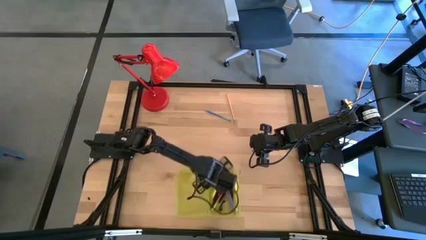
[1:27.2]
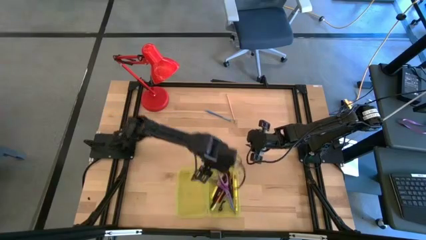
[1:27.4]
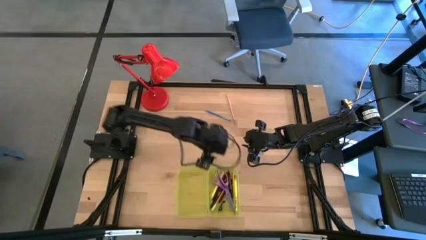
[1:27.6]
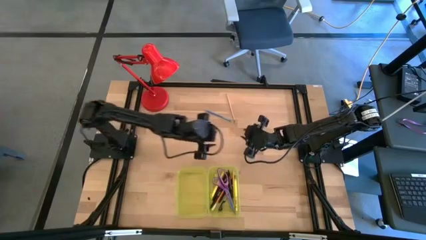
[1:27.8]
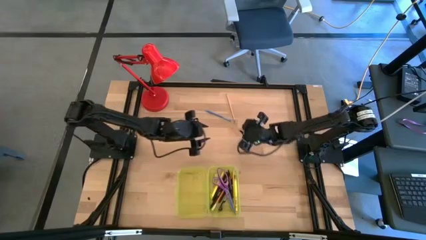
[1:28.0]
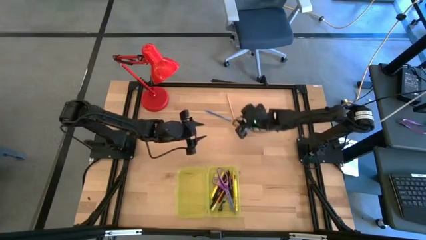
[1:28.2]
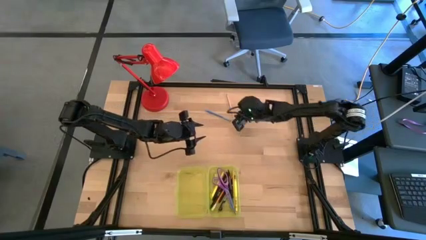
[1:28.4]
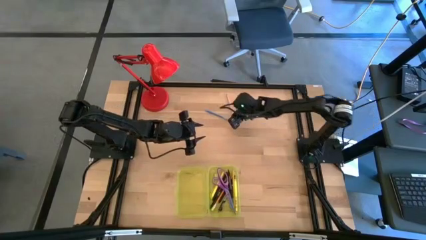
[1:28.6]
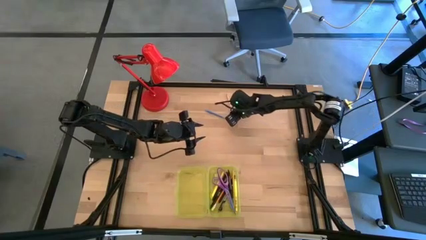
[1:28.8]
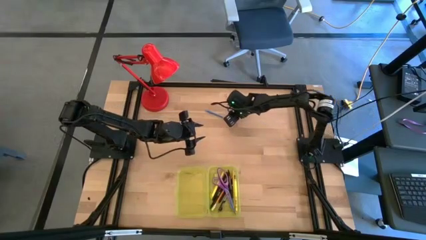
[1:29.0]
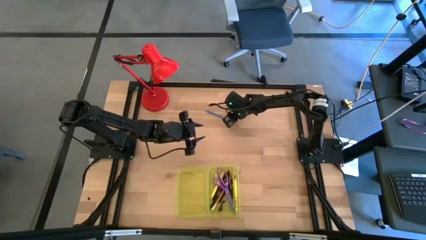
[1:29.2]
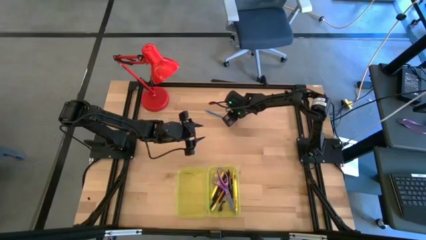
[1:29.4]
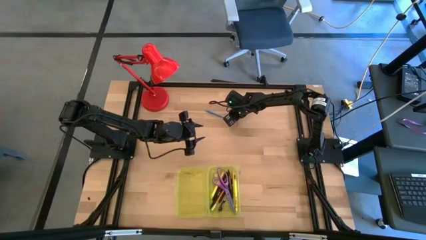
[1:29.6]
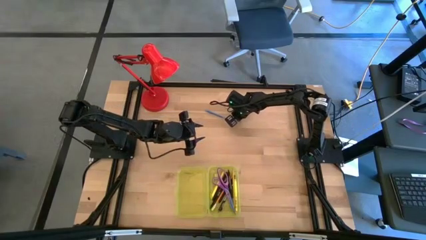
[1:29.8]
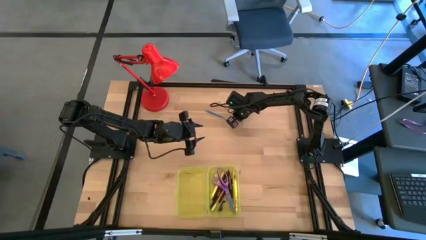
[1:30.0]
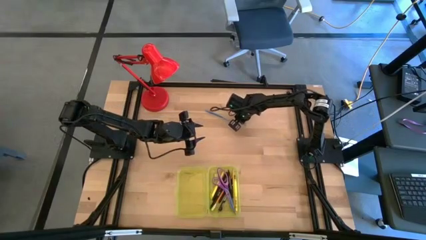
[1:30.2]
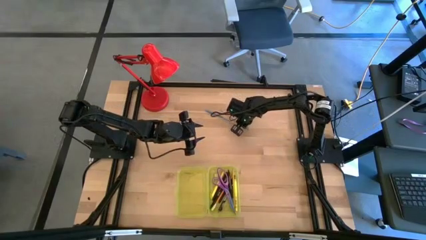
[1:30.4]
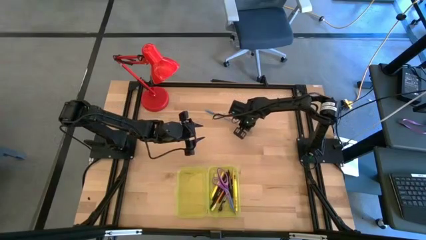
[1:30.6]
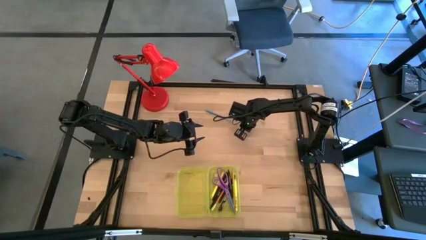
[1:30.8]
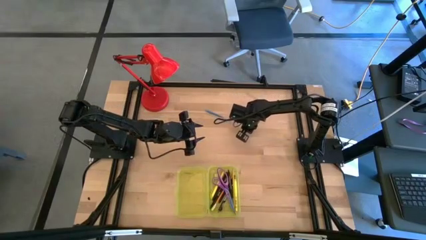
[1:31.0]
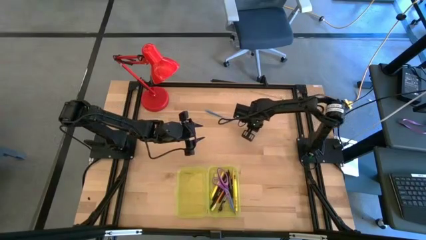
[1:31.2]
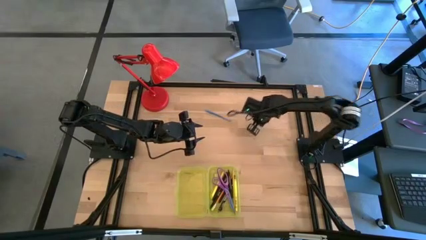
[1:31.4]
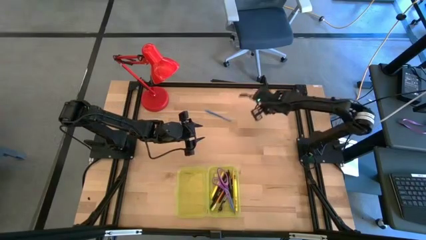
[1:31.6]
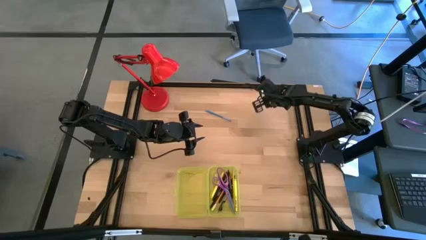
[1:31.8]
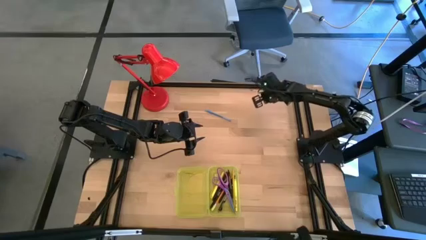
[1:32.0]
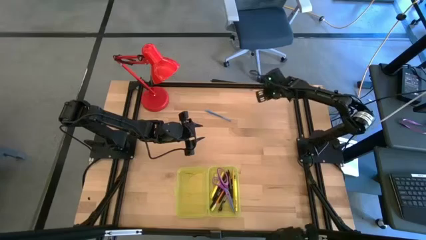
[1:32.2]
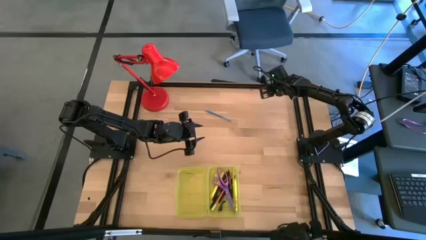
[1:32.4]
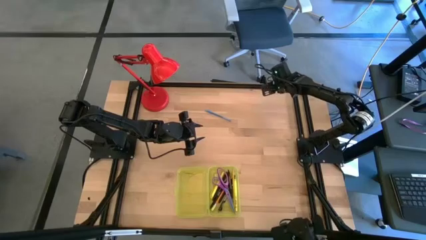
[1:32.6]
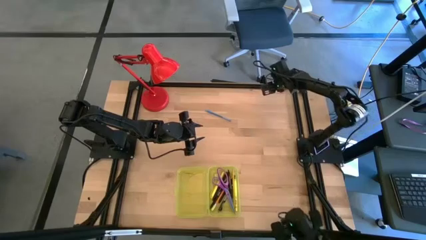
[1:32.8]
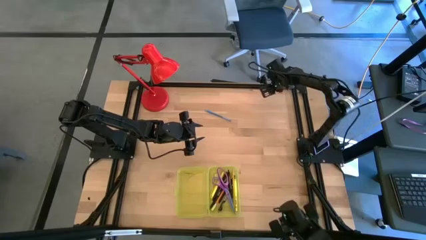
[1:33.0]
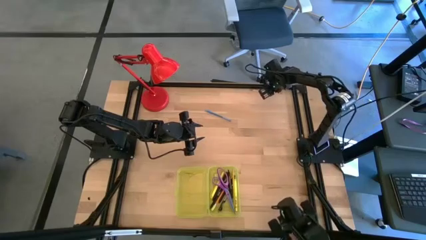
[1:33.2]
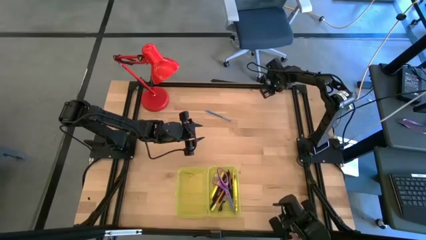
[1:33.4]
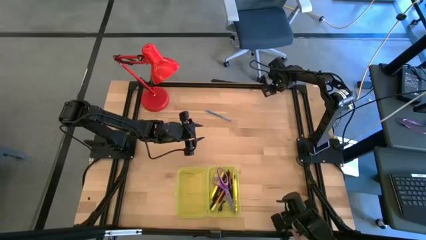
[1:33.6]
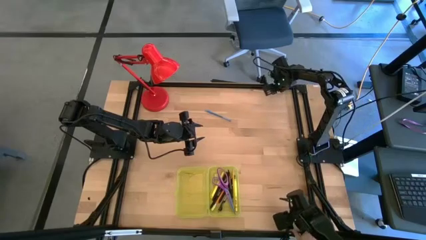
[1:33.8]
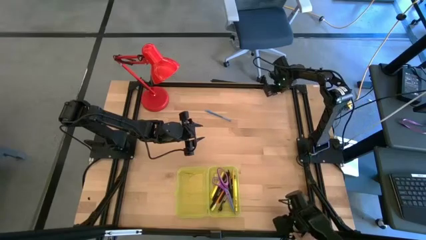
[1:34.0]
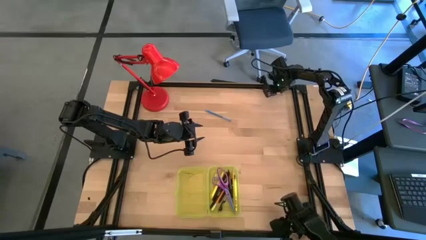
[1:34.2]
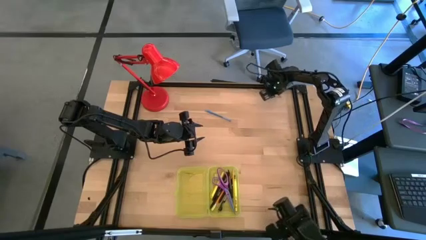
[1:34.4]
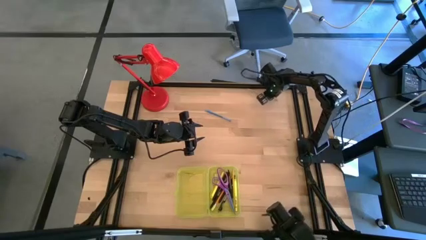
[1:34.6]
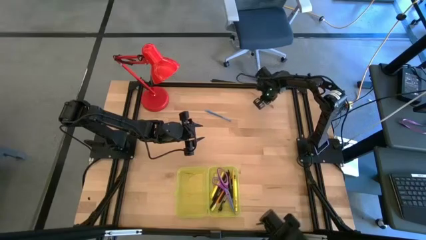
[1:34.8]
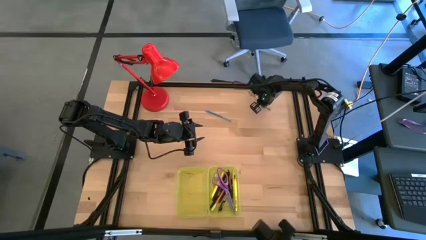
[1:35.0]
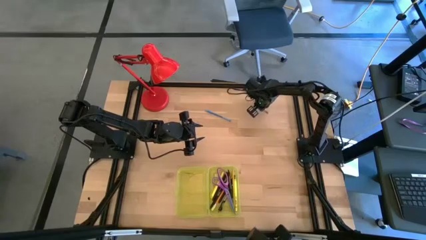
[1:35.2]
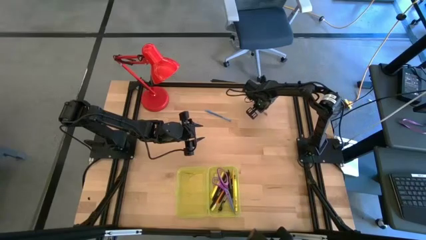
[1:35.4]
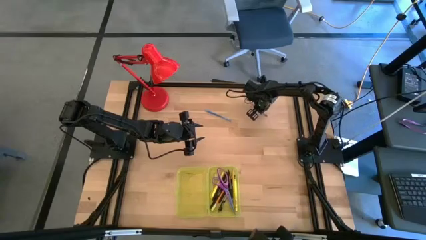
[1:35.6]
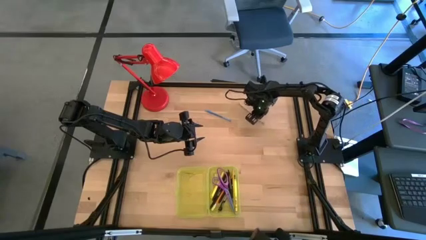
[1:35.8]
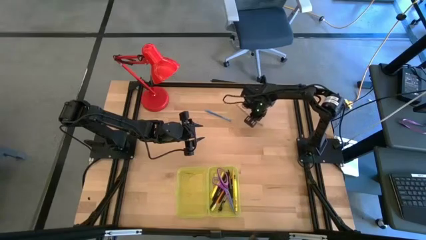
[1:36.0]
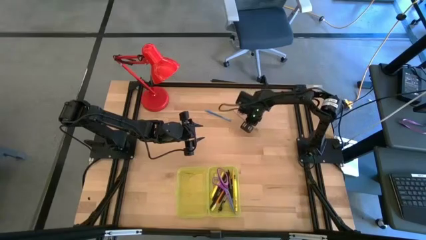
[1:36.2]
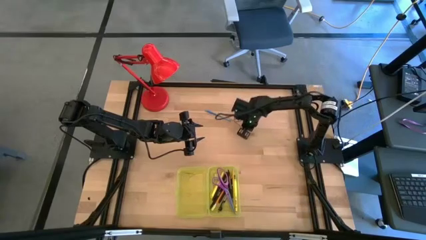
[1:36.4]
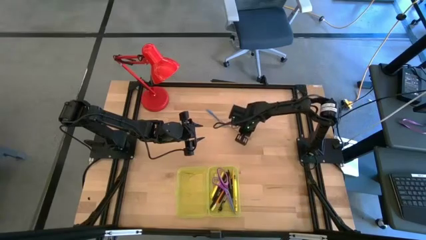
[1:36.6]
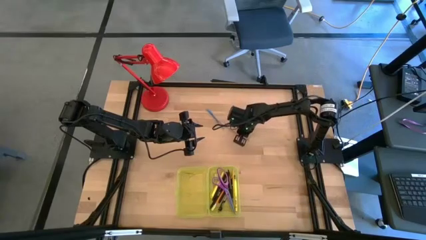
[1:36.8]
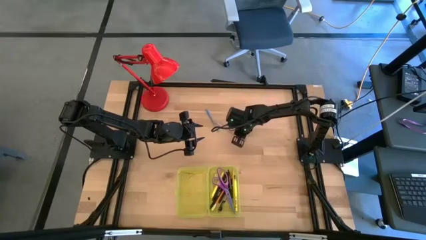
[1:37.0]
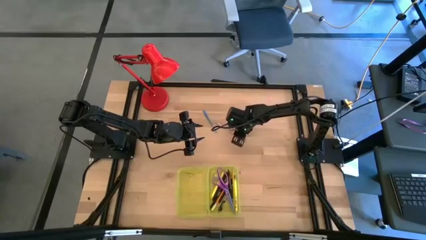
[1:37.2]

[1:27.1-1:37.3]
Task: Pick & place school supplies into a supply box
Put the pink pencil into the yellow supply box

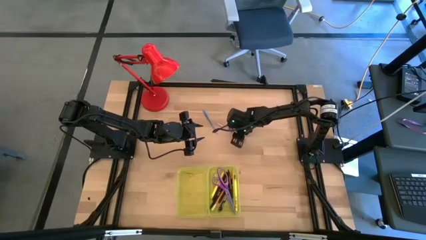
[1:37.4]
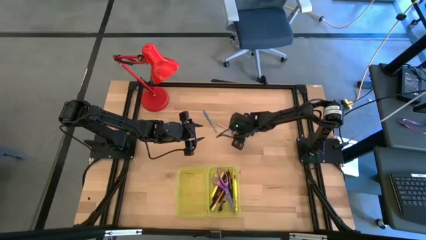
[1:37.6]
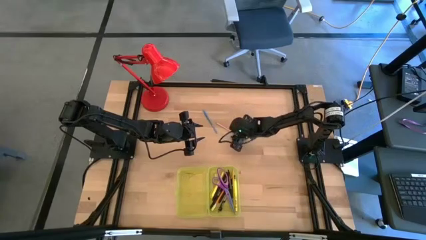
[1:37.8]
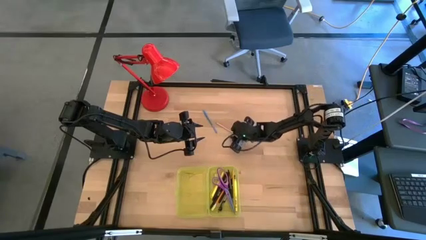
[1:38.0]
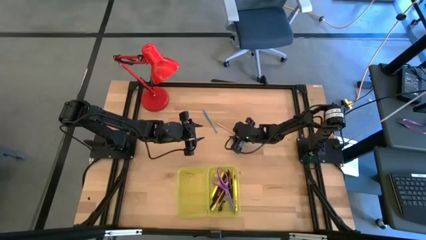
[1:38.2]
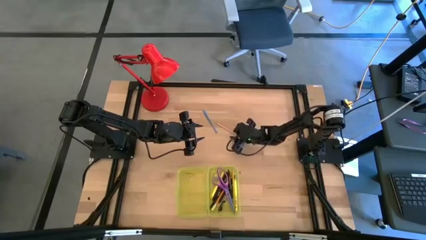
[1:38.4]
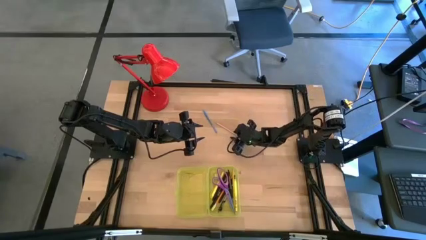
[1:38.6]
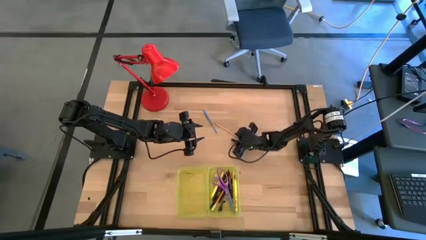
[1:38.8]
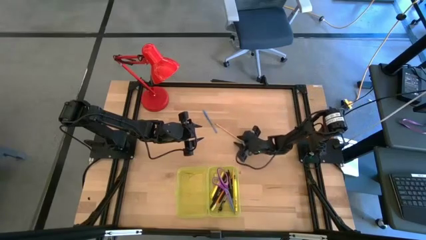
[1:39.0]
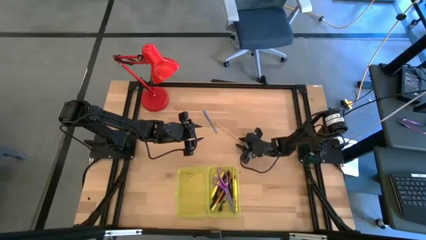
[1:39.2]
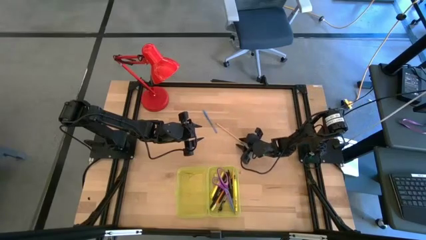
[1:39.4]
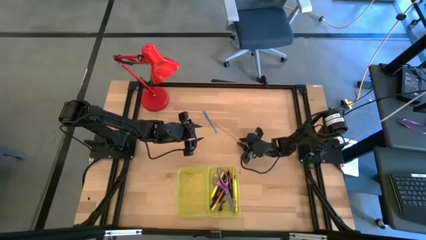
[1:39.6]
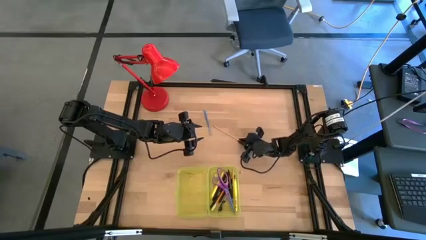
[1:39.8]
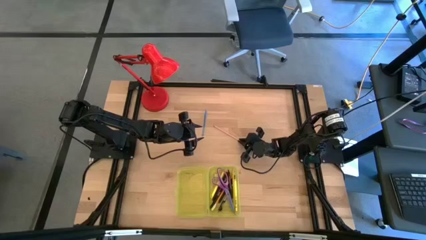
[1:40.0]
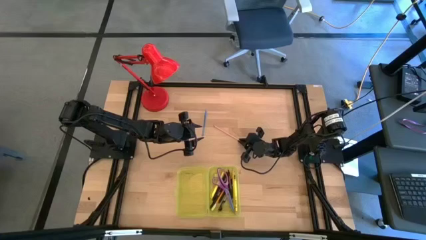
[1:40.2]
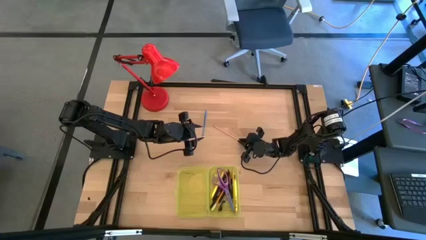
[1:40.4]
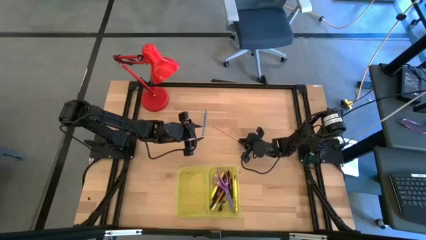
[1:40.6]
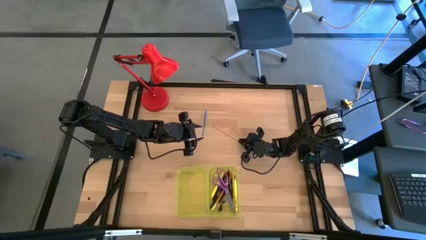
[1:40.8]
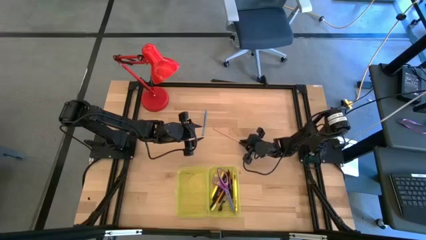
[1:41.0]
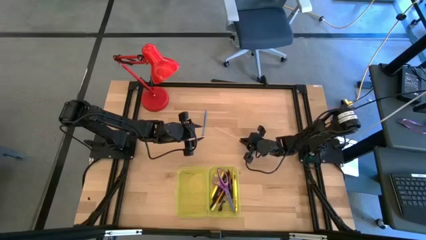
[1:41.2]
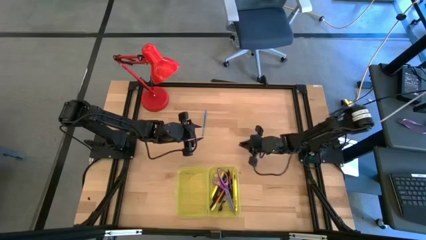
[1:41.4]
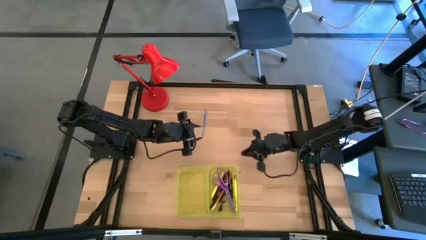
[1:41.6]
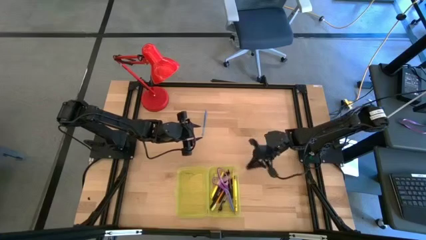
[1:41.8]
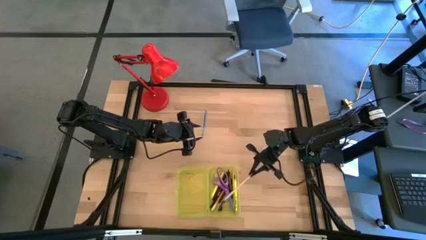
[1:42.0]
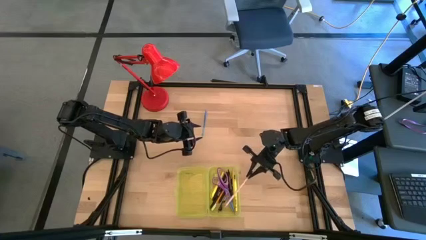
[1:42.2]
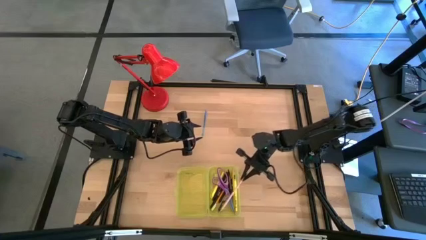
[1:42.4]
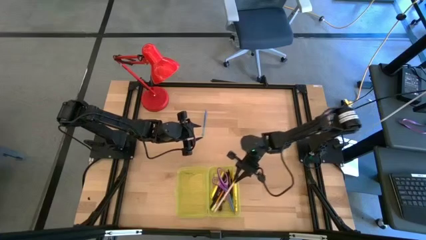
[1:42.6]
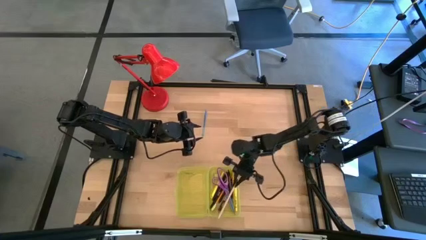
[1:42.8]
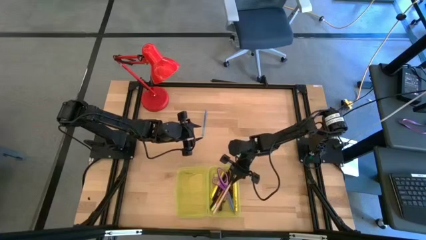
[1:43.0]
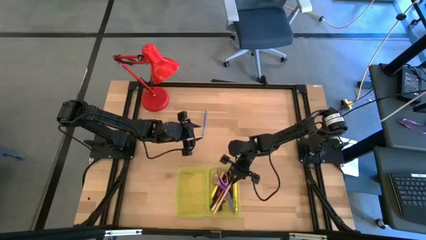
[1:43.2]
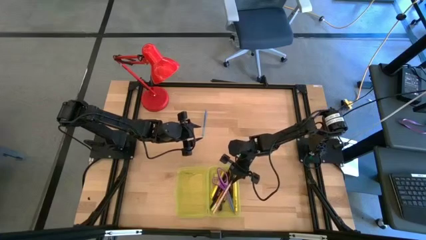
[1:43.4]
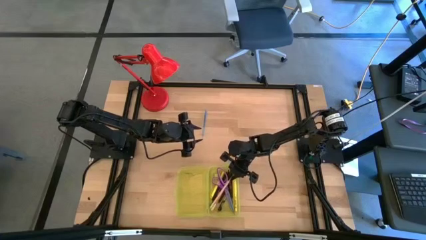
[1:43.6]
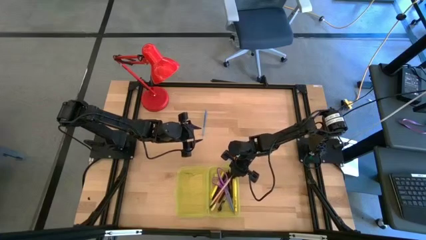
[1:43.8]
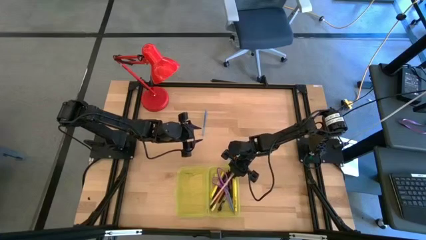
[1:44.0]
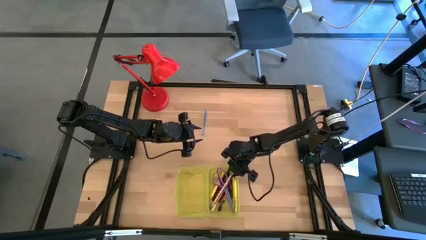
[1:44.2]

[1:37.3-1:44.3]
Put the pink pencil into the yellow supply box
